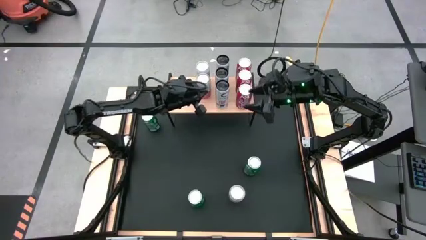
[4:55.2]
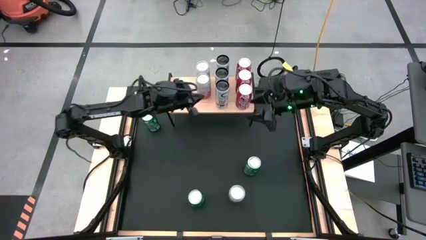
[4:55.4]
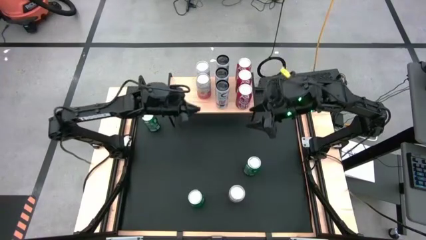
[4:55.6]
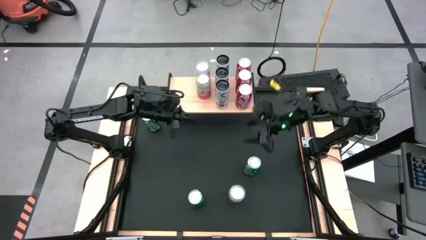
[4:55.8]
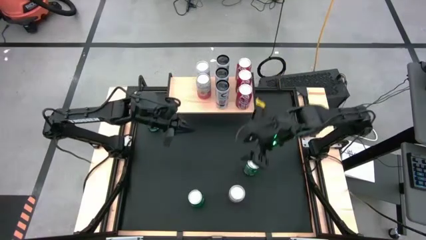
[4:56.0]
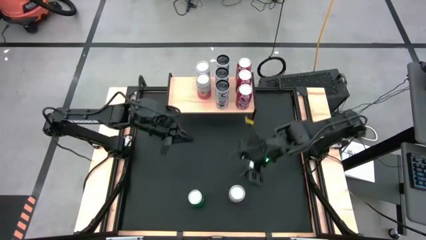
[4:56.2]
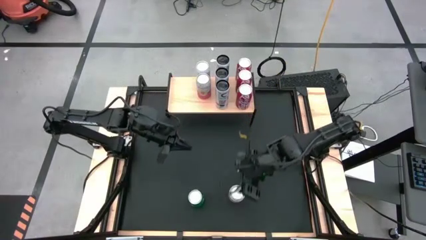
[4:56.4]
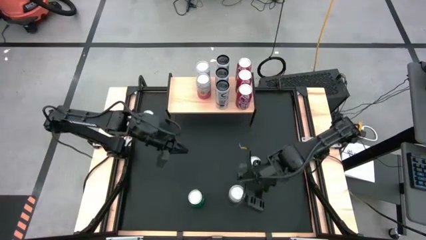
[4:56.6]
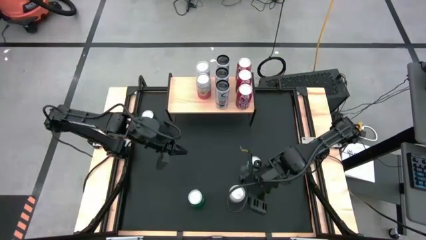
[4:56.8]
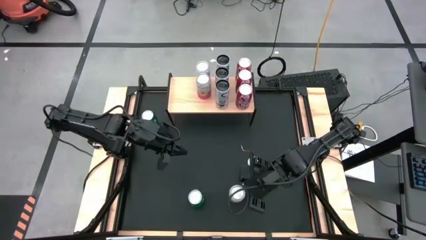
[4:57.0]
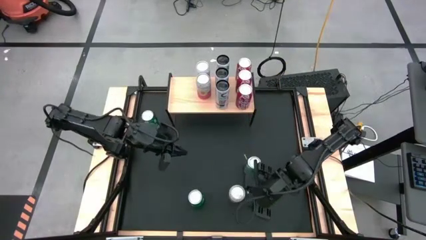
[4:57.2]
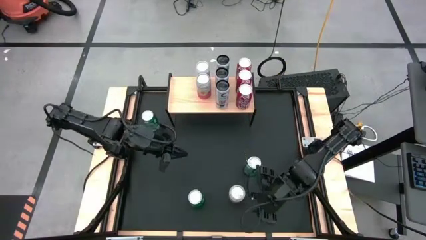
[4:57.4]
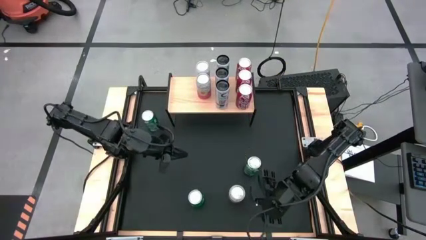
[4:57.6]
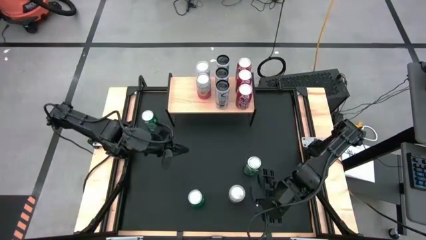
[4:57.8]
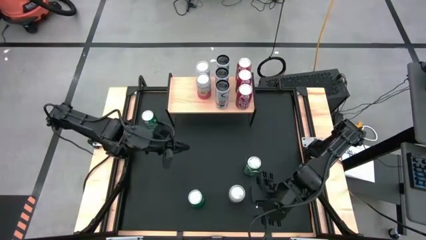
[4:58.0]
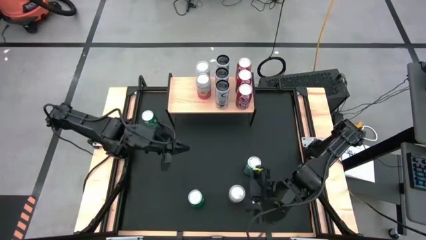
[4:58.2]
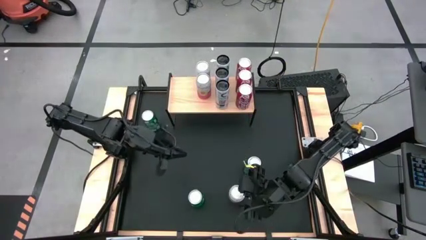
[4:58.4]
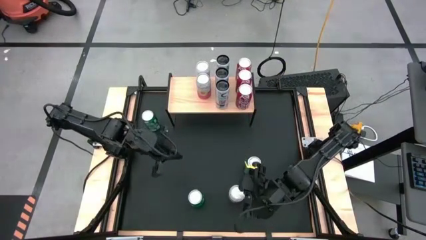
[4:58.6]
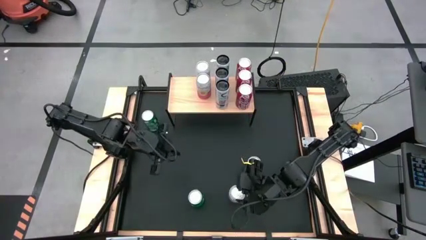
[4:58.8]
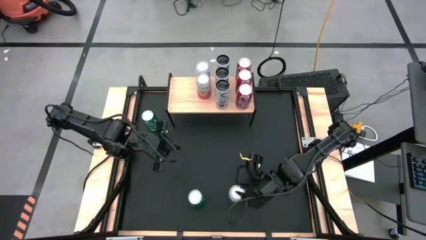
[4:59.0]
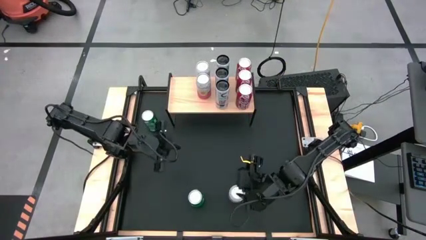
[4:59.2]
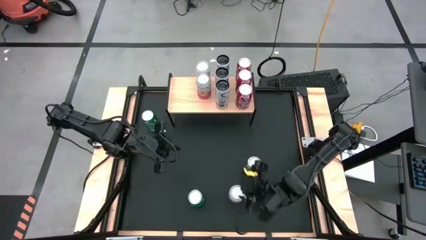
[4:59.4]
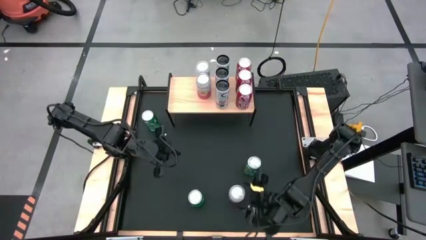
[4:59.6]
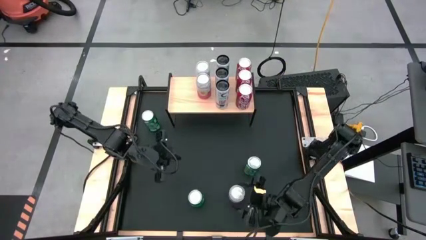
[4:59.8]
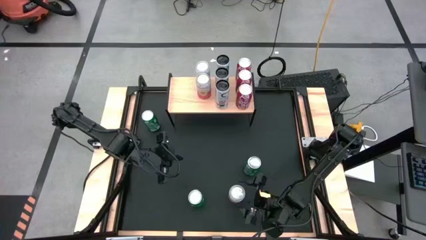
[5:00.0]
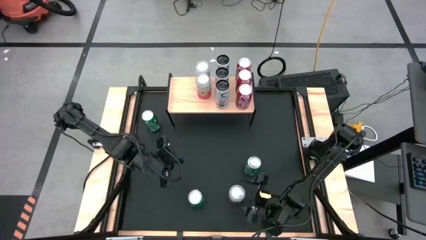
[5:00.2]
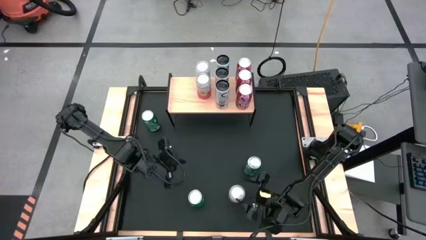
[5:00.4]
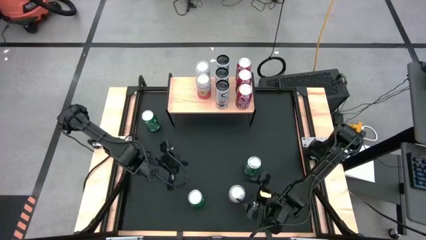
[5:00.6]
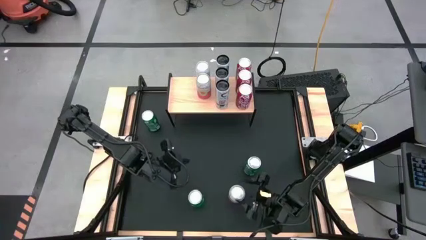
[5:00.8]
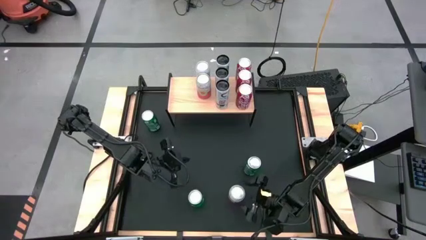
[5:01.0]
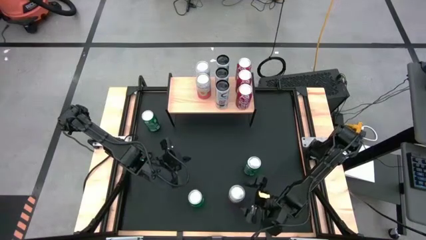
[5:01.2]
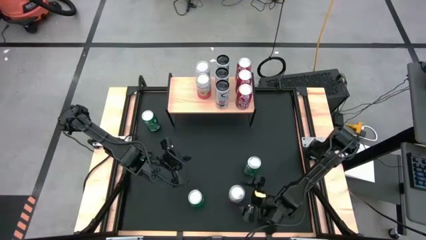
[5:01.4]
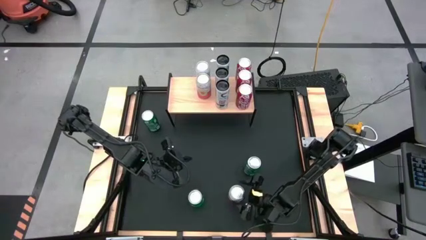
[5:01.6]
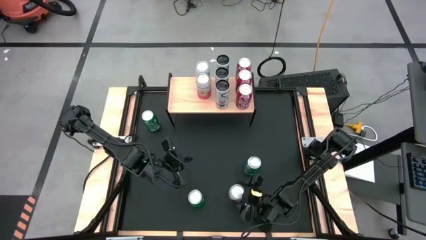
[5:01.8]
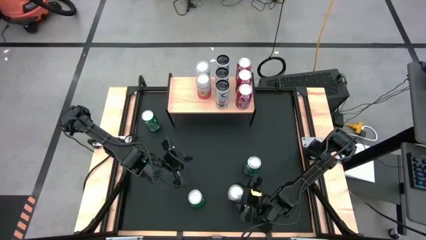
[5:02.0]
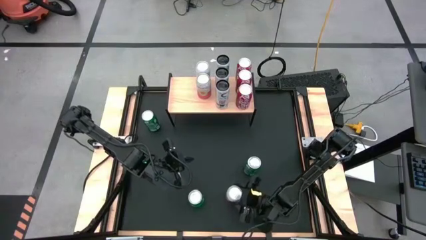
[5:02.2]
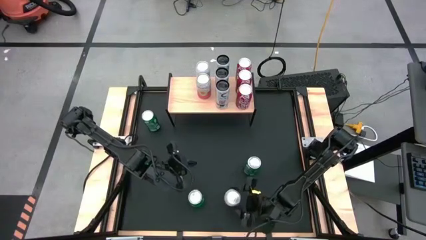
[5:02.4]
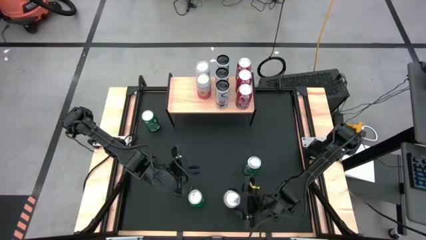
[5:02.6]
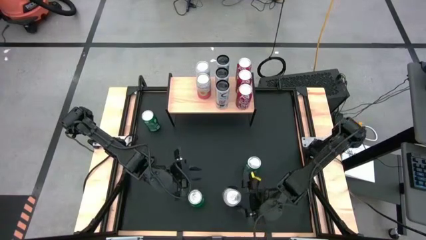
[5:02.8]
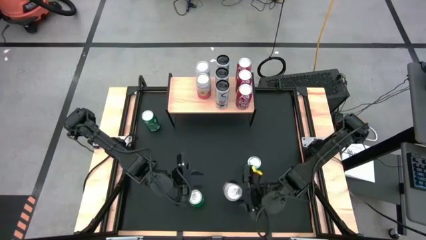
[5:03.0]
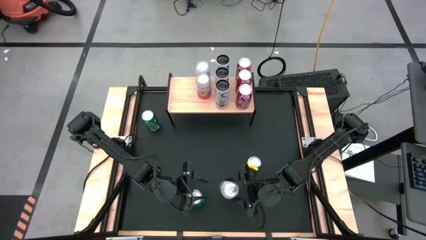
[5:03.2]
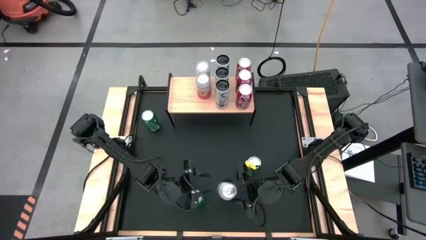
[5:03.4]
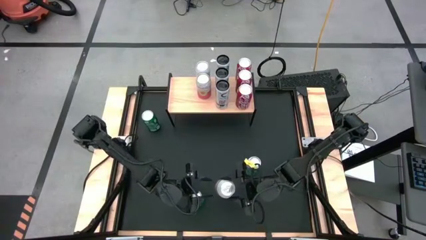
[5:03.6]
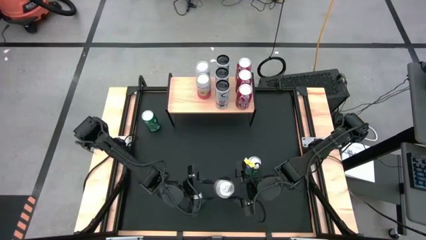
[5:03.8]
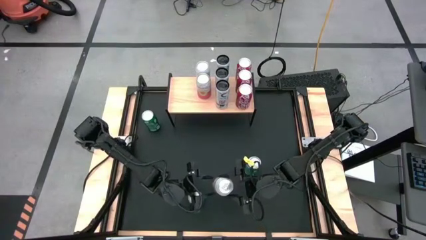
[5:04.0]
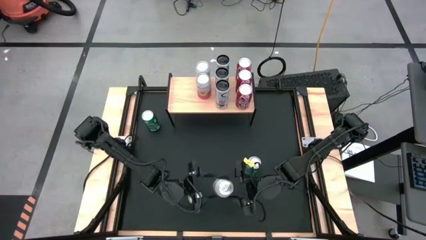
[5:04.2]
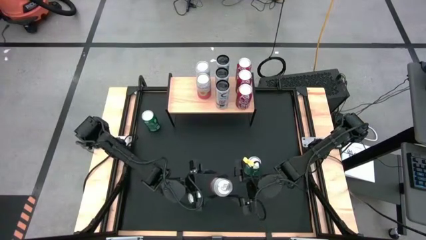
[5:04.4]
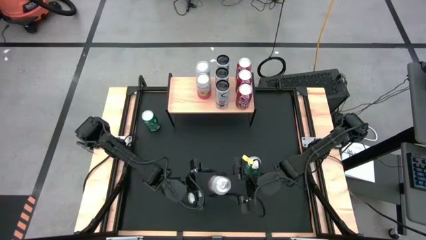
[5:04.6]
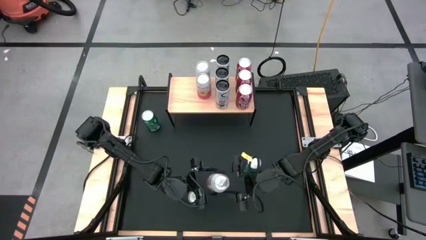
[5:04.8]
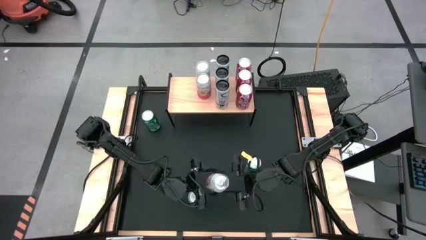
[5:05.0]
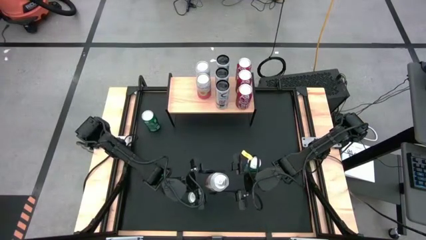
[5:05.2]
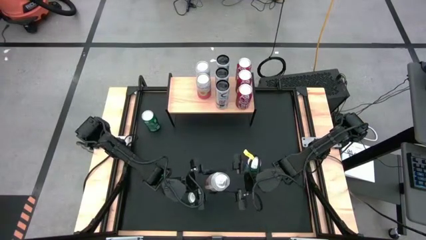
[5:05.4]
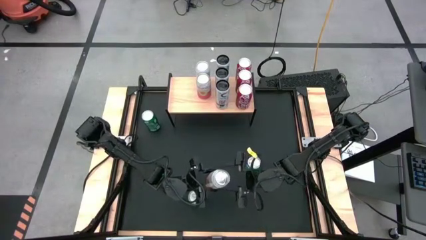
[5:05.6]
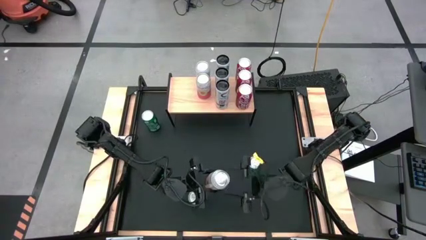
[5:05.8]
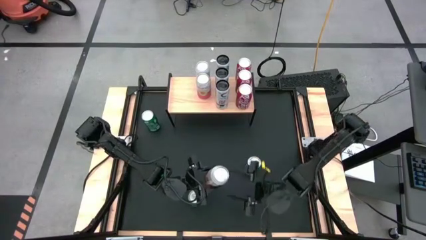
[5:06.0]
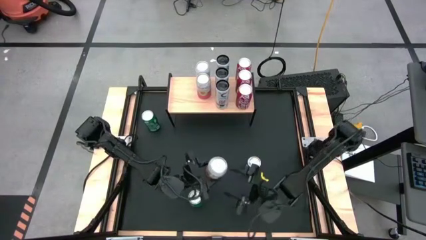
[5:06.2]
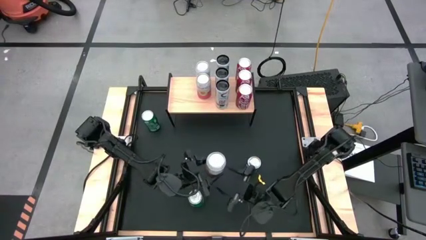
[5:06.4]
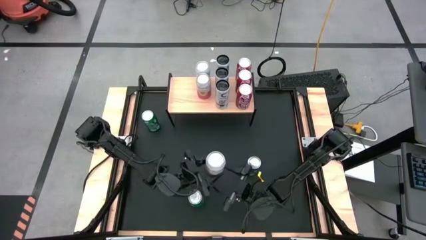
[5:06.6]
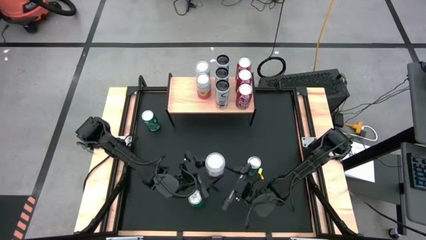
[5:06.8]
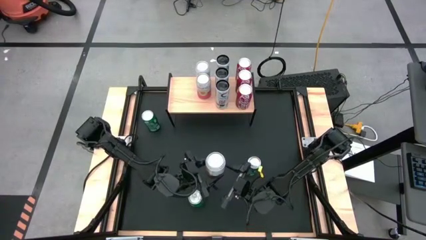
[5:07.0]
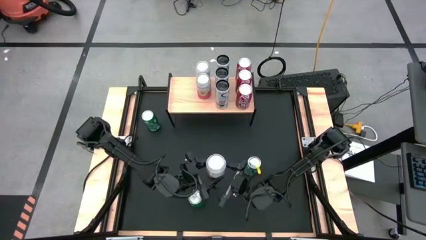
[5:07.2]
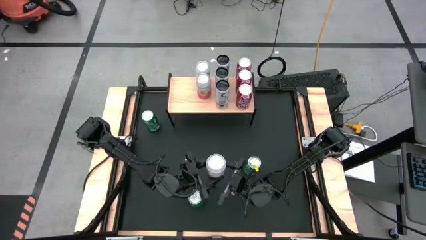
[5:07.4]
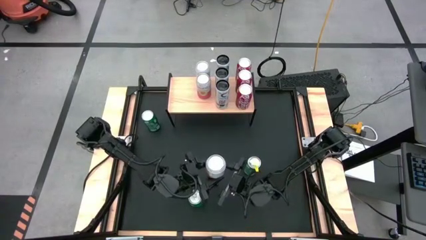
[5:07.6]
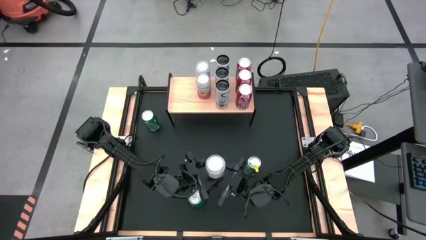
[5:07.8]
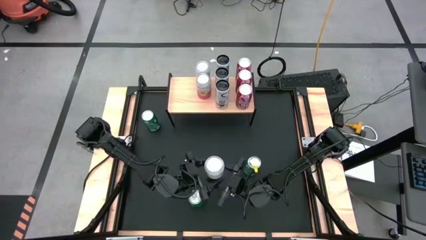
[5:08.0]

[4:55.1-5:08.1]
Task: Place canned beverage on shelf
Put the pink white soda can aligned with the other pink white soda cans on the shelf
